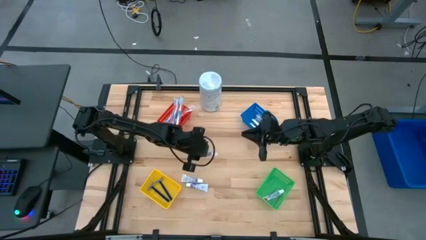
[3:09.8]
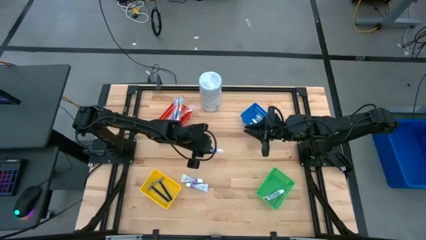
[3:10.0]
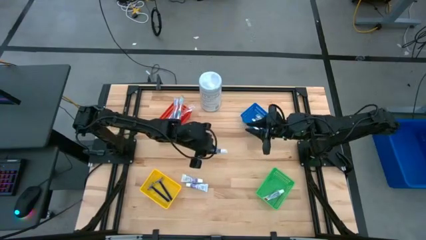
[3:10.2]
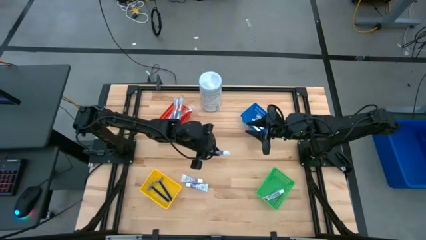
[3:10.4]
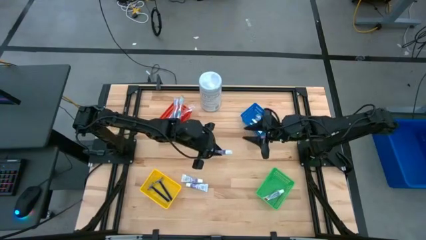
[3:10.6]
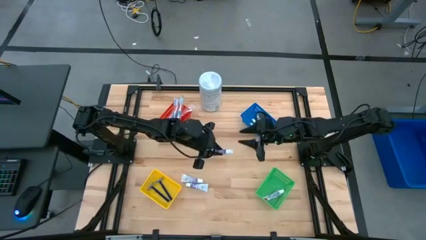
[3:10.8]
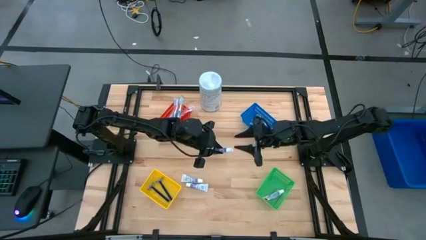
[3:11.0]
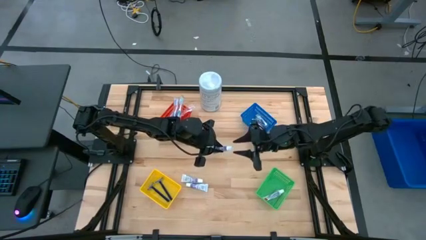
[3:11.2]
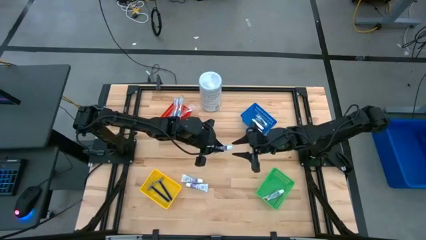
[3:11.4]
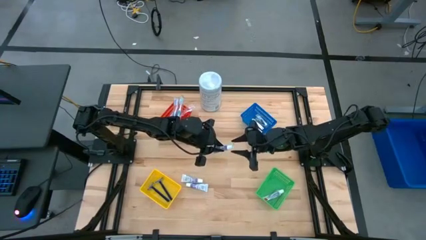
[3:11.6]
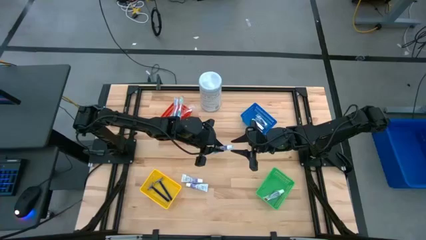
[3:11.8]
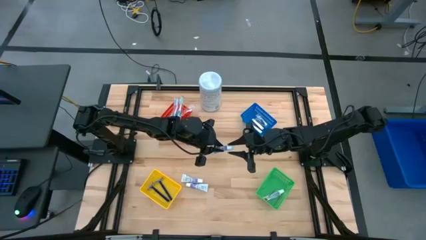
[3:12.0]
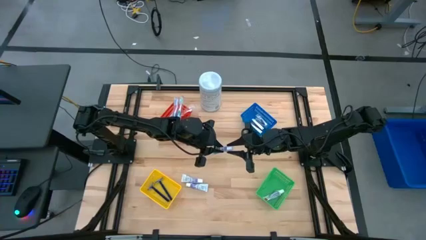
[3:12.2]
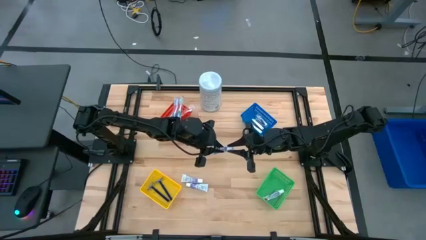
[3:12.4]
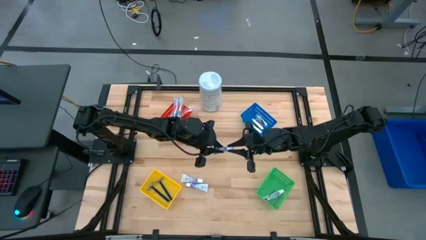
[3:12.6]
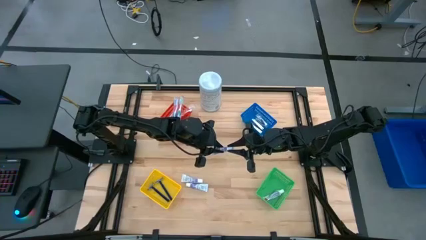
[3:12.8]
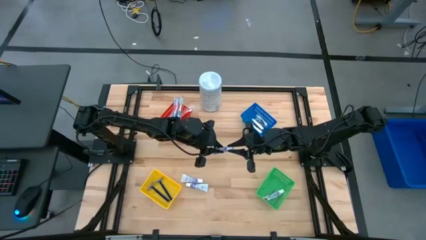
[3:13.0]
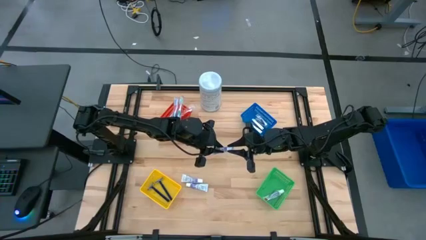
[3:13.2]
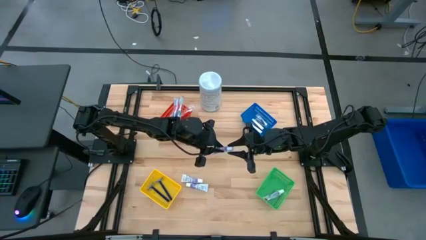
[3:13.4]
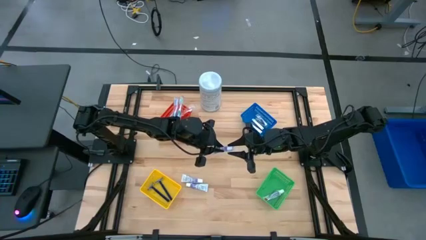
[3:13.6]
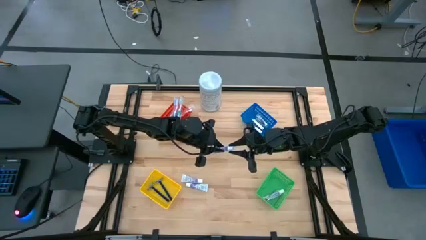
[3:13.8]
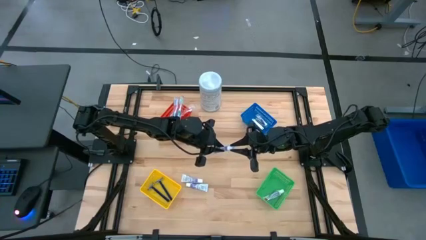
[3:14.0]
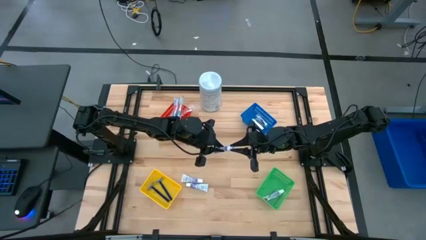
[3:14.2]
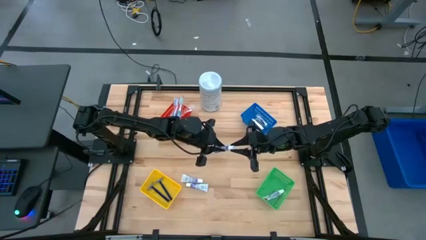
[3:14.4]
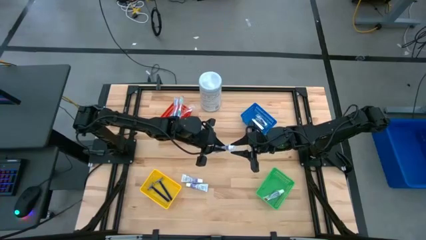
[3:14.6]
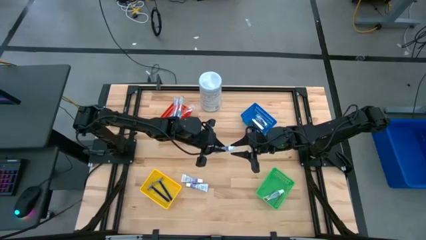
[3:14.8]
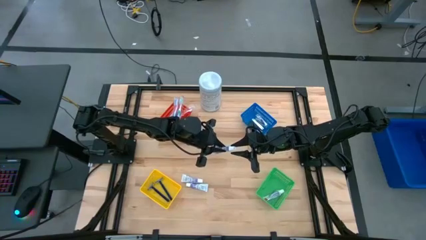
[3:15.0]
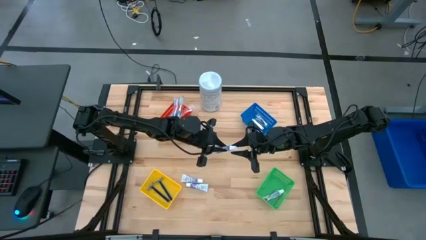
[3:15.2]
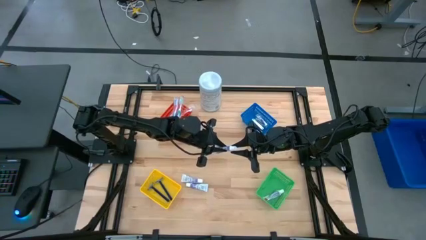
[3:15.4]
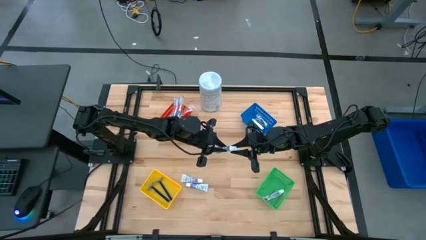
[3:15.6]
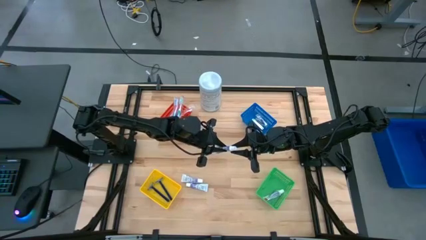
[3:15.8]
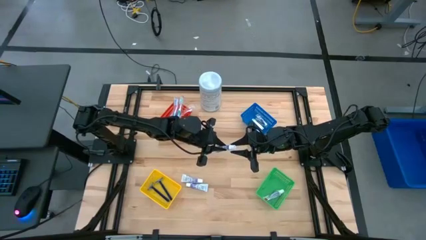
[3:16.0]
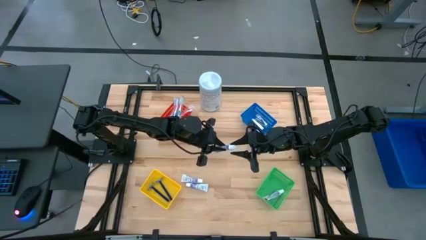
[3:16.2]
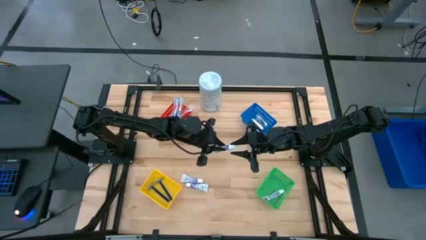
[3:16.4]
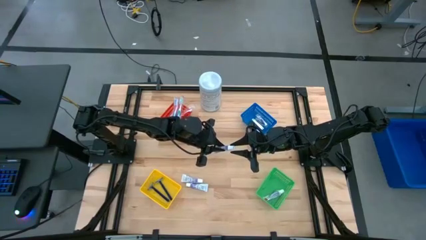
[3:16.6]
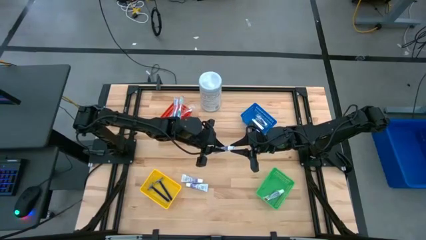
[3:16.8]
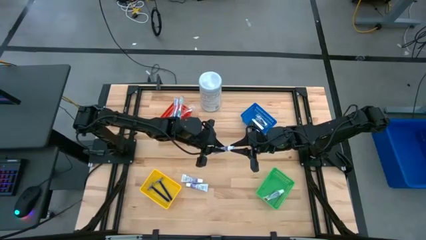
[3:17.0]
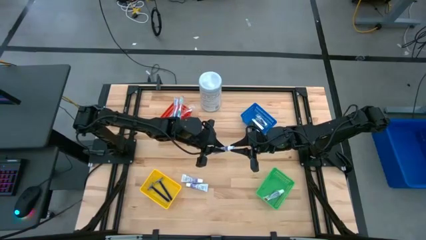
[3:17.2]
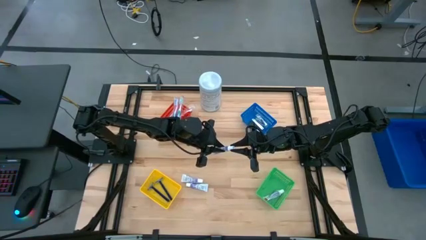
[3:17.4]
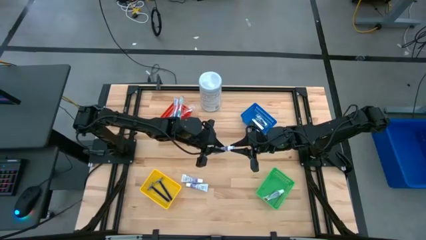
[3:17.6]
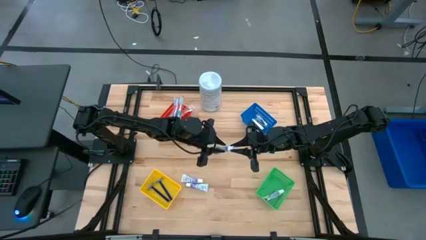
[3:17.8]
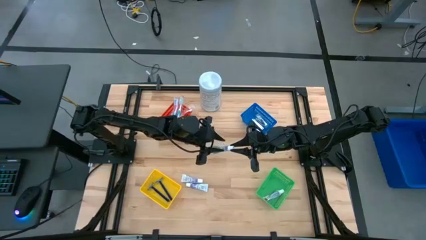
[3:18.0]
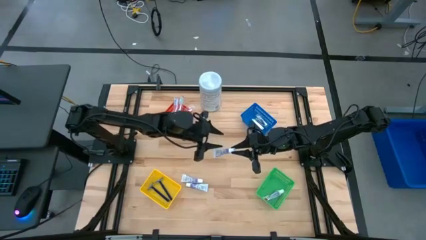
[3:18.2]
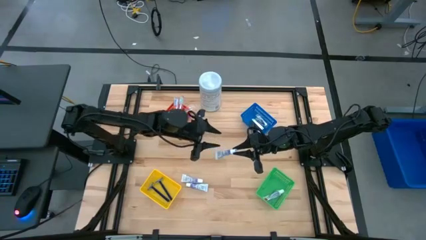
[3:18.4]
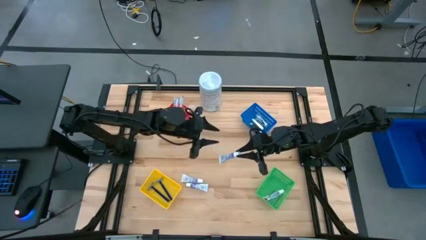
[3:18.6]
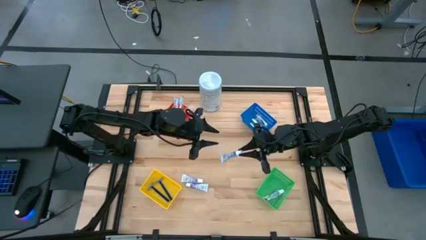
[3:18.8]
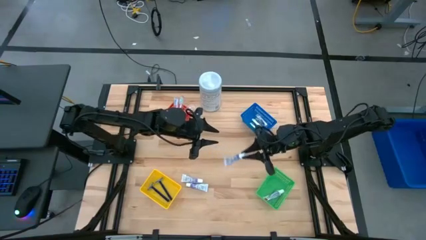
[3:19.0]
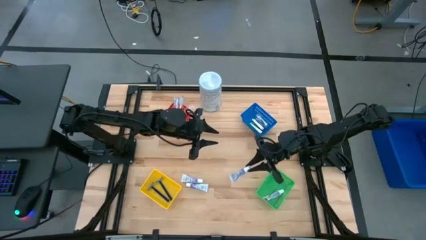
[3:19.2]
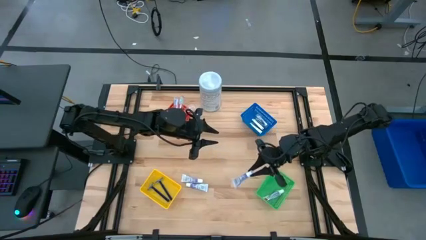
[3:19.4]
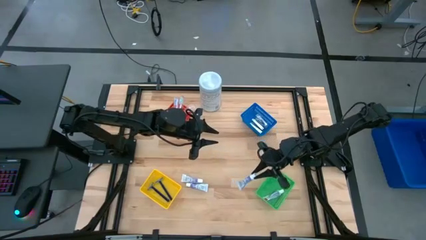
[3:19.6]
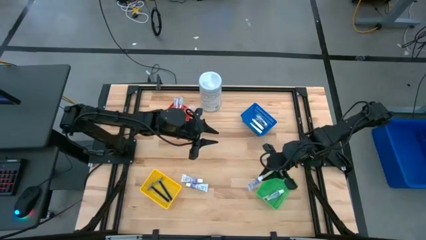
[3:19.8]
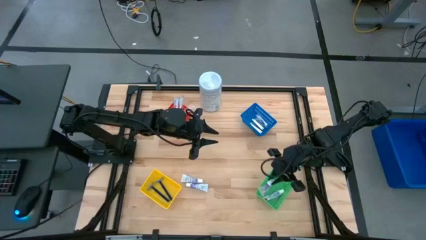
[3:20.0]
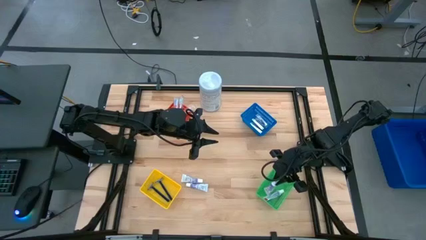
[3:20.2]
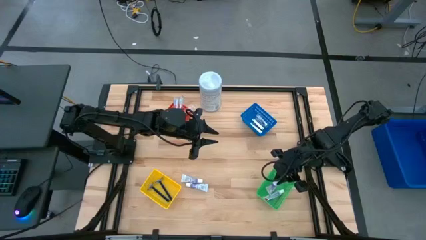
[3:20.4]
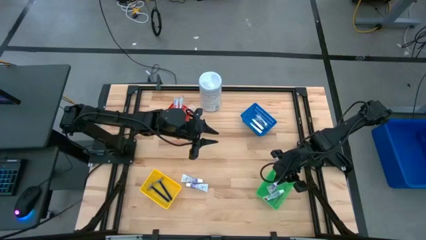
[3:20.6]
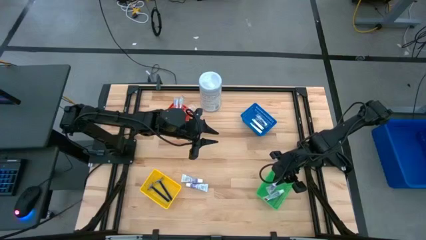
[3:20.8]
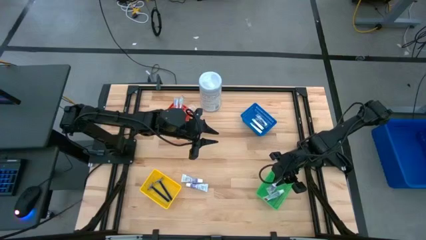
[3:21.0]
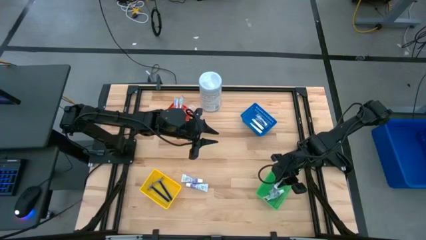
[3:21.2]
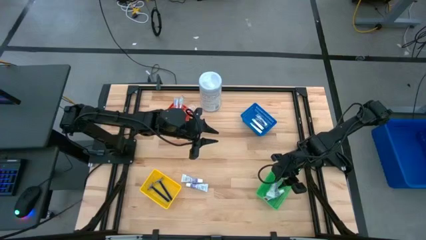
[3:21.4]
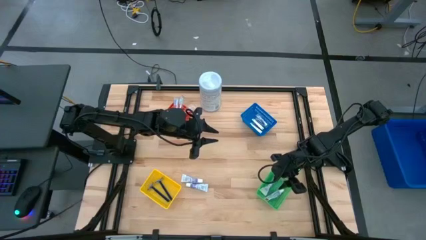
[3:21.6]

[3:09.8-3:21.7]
Task: Pick & Place Travel size toiletries
Put the white toothpaste into the green basket

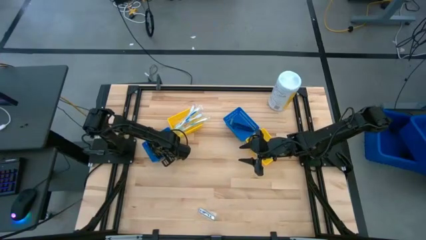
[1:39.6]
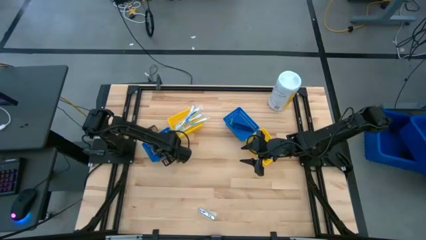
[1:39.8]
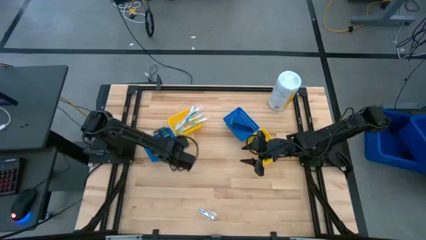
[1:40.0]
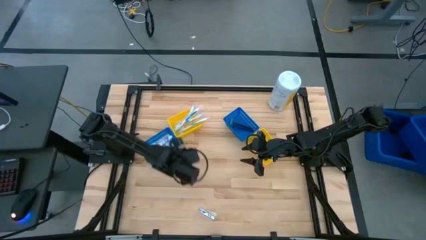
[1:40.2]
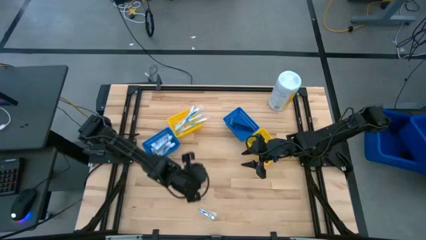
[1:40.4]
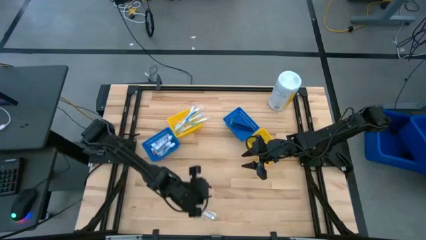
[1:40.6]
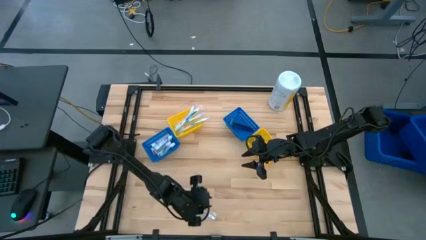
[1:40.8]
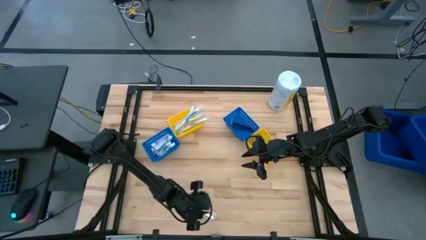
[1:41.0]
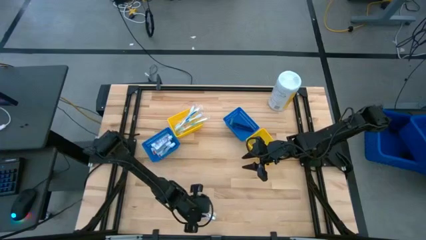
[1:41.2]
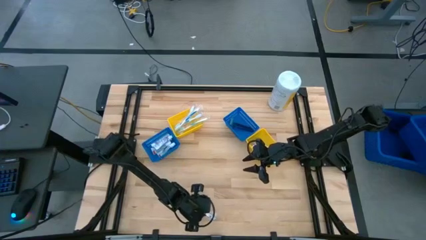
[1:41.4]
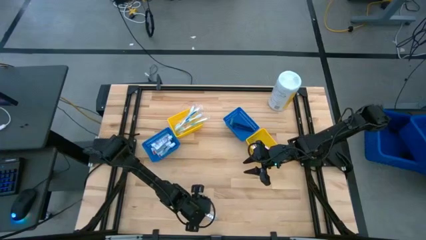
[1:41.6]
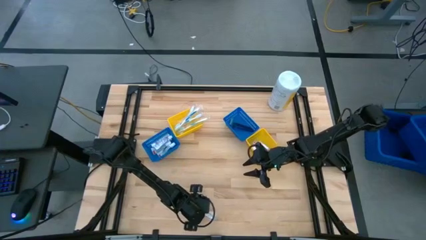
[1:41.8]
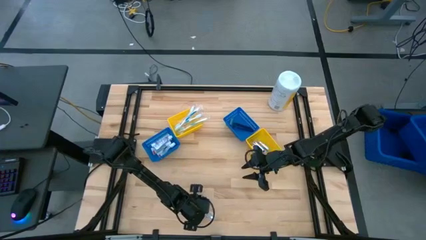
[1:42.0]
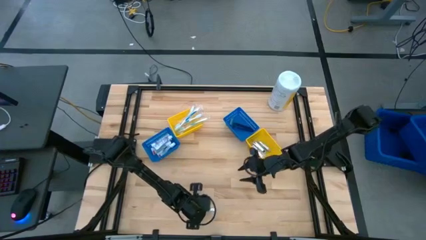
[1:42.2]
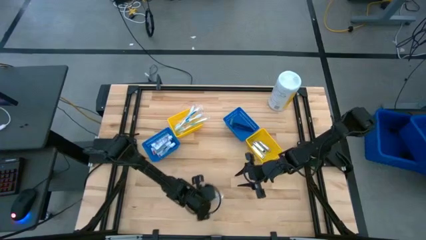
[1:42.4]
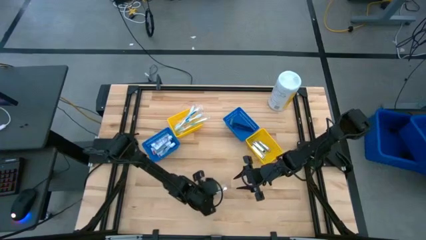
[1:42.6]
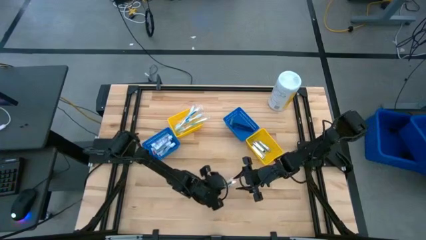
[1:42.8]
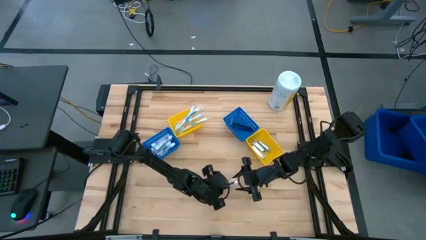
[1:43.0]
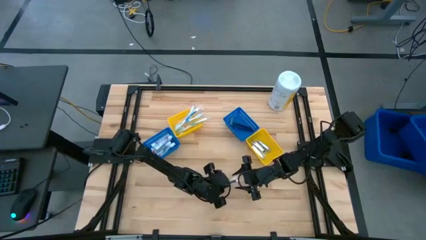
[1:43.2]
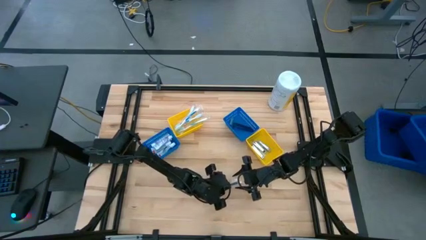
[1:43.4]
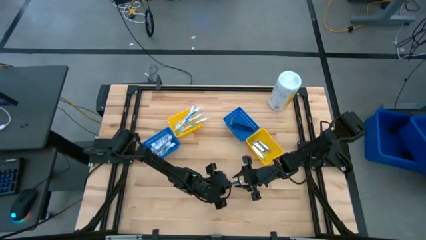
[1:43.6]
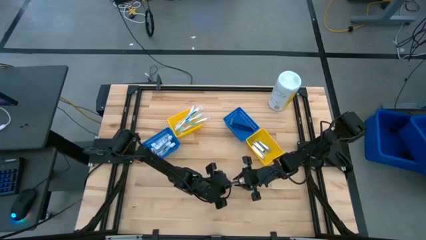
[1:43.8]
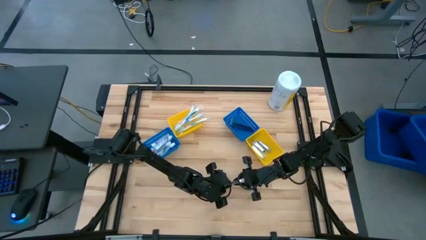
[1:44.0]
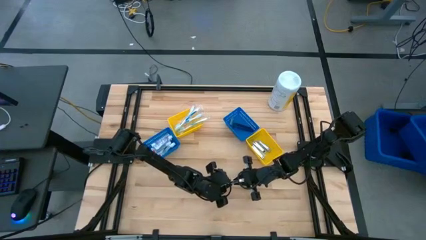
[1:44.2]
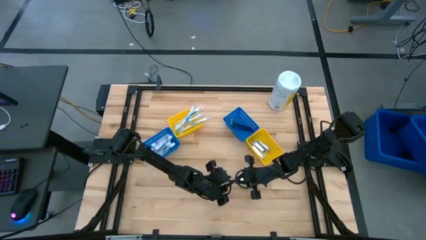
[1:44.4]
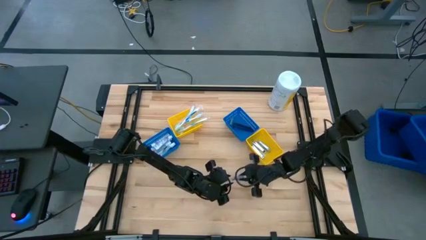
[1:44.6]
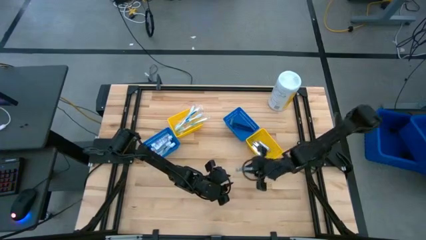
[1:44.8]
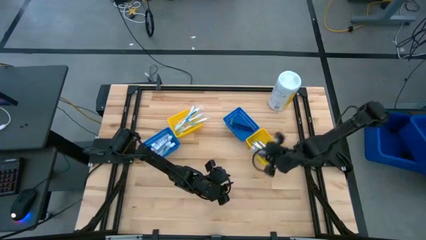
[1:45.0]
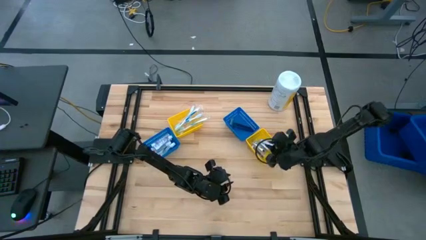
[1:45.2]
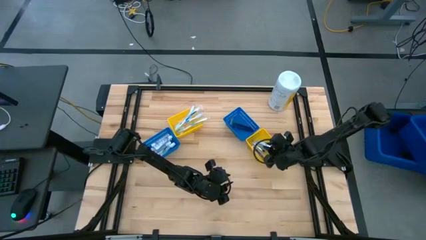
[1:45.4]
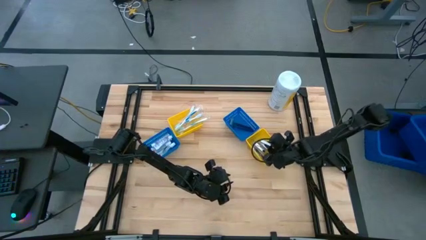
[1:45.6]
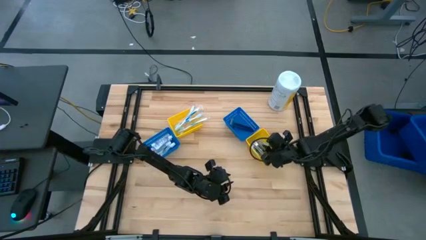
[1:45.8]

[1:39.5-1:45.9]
Task: Pick & Place Travel size toiletries
Put the nail cutter into the right yellow bin
